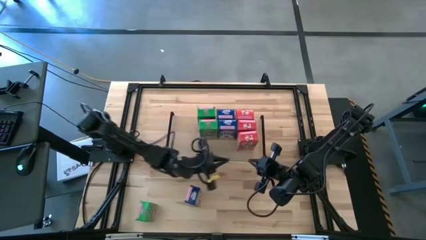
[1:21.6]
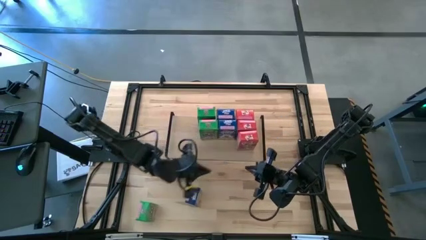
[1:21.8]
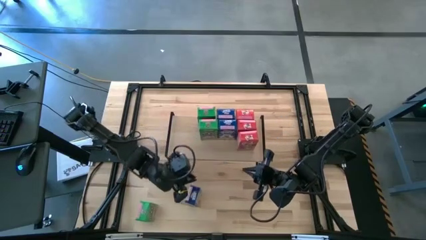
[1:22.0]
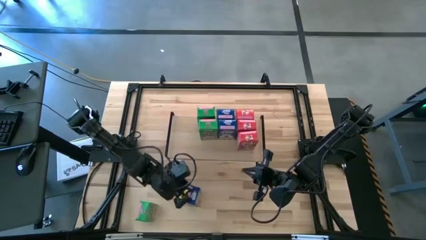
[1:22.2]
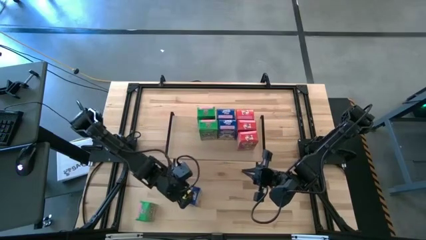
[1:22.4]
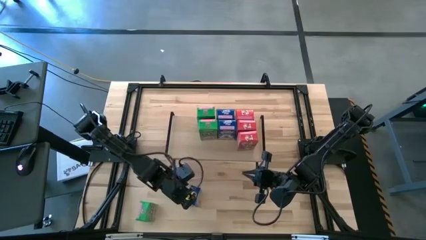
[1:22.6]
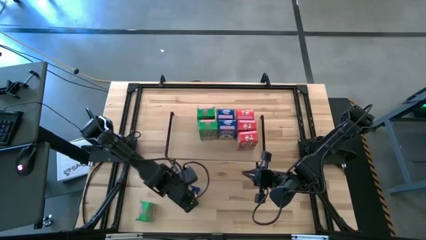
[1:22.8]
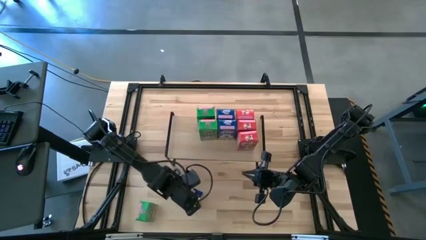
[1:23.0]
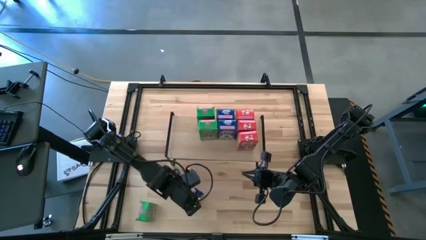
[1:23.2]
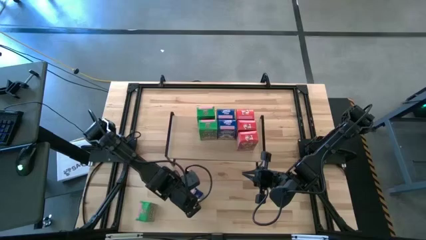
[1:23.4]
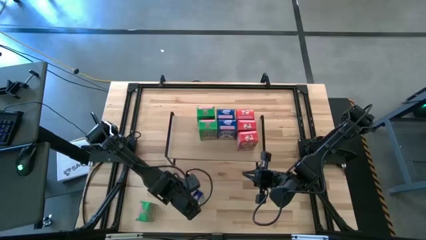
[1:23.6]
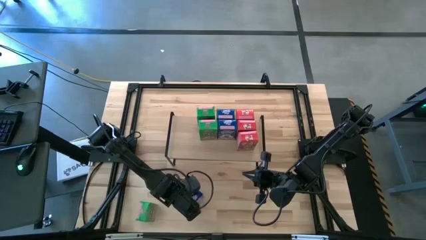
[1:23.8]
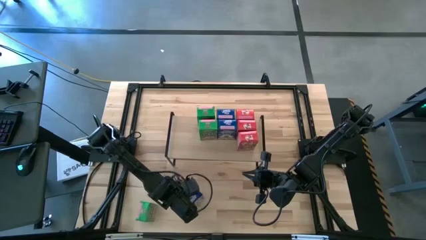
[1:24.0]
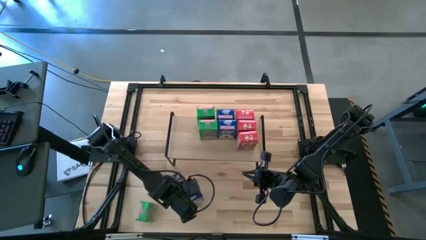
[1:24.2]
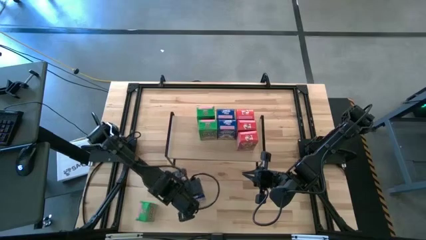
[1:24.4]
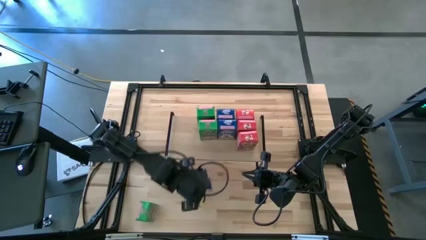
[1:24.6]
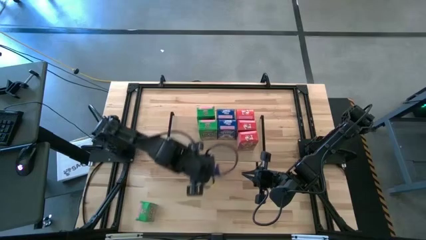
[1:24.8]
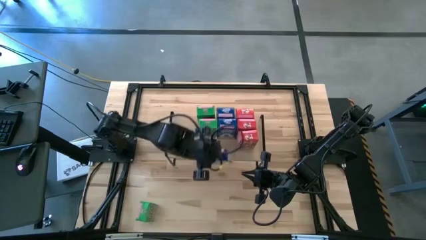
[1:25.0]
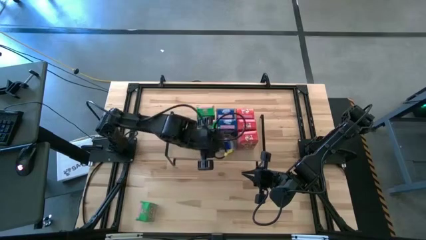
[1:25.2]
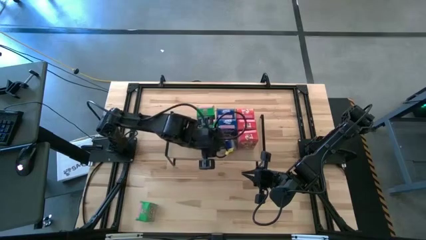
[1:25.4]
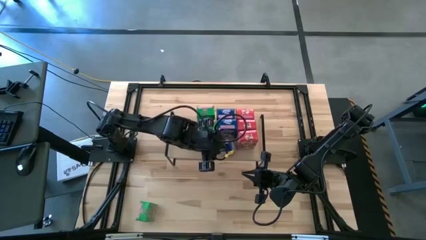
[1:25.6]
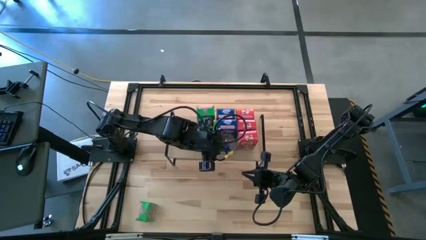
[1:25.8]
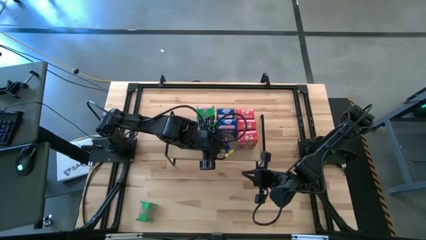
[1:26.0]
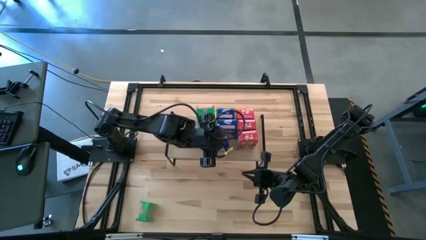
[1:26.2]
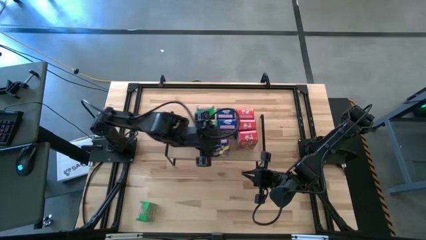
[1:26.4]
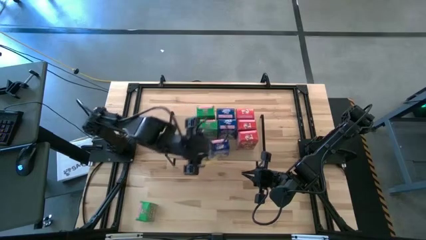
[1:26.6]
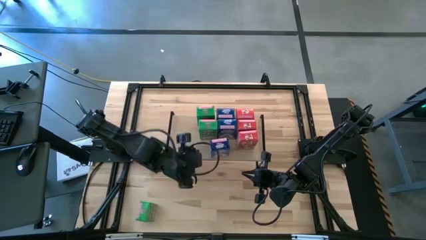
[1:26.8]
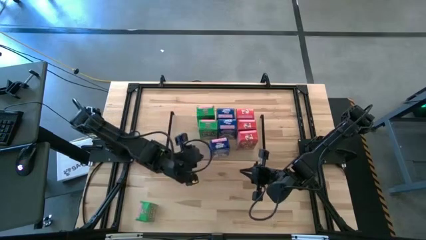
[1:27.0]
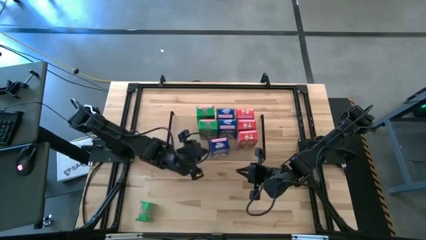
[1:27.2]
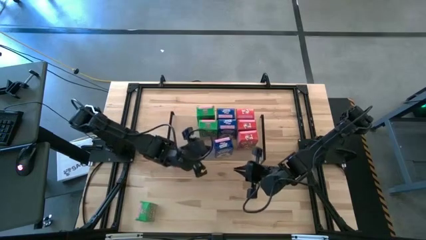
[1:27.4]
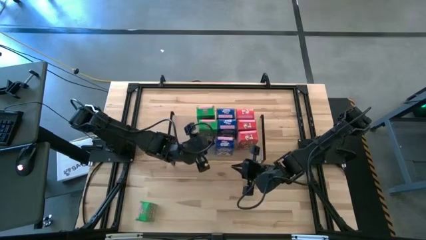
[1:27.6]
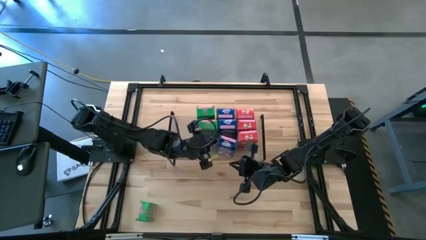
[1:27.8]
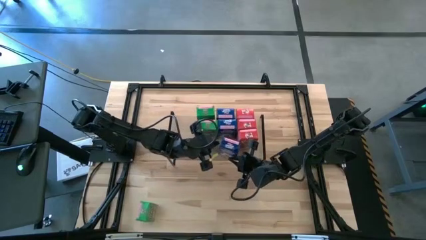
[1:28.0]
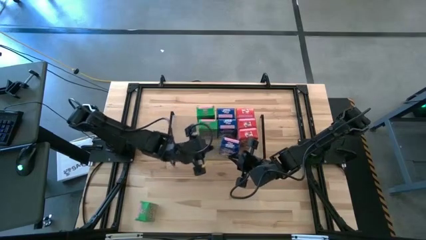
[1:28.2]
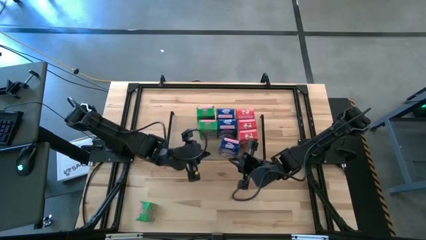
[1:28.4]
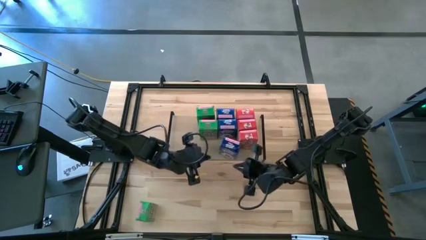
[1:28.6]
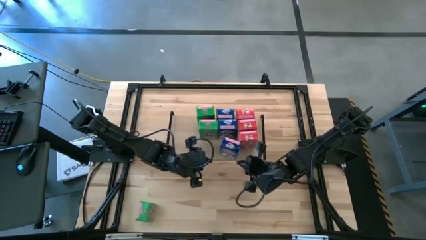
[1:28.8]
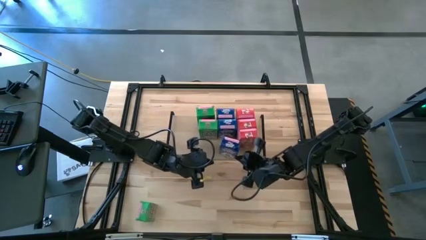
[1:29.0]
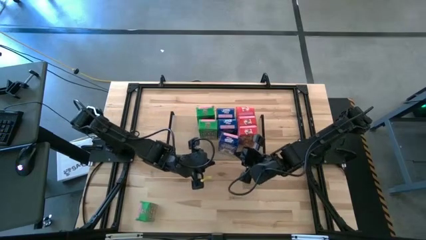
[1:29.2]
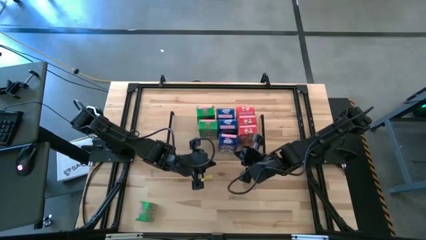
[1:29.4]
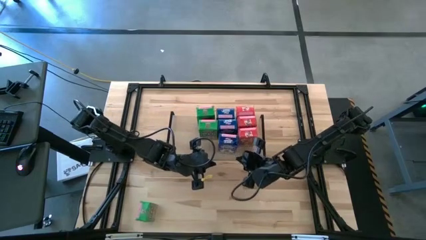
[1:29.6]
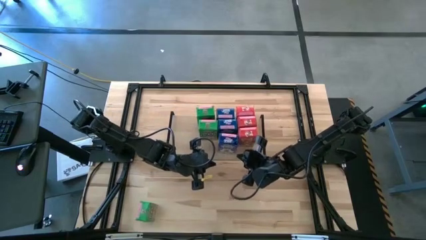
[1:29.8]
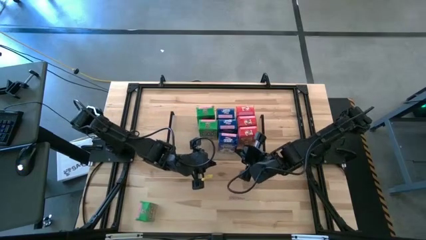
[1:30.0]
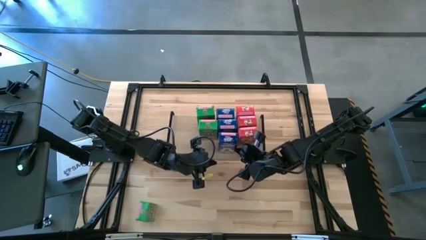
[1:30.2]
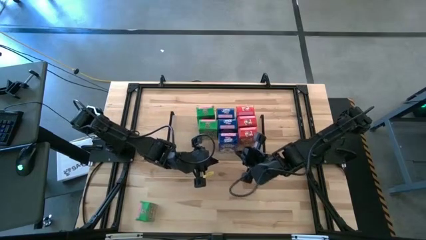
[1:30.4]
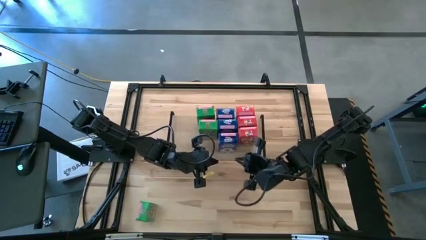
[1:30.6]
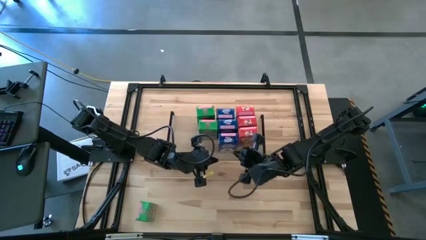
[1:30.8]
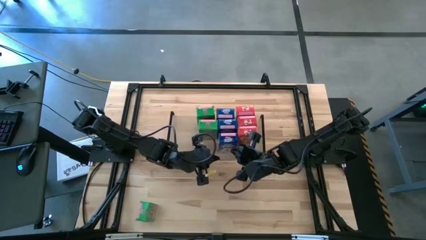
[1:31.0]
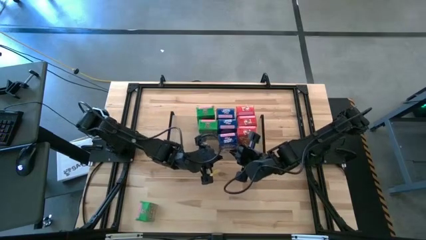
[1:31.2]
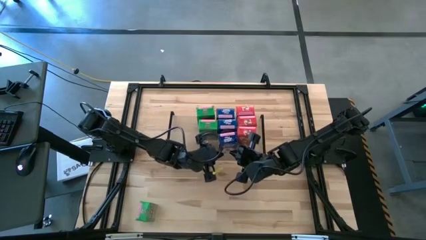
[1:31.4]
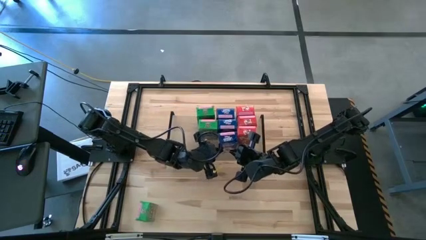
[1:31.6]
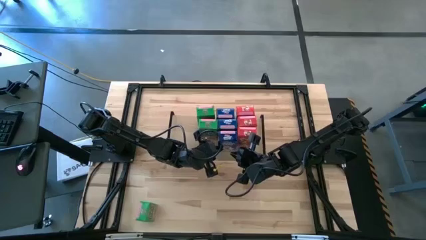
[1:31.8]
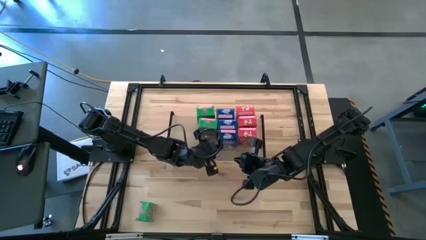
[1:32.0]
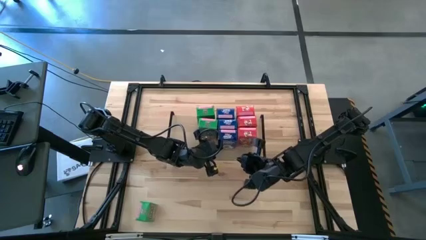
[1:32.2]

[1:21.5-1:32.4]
Task: Stack cereal on shelf
Put the blue cereal box on the shelf aligned with the other blue cereal box

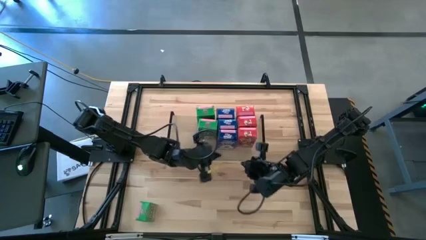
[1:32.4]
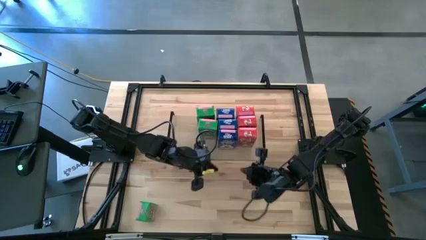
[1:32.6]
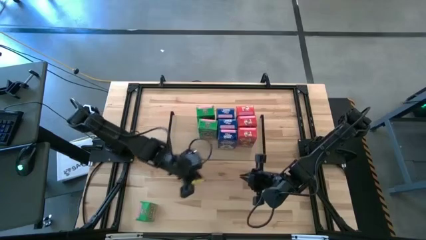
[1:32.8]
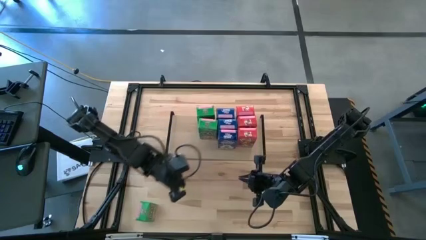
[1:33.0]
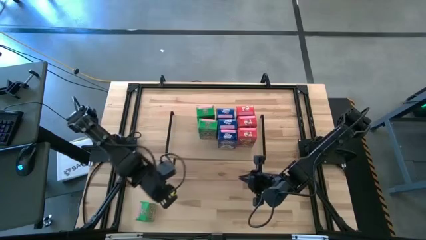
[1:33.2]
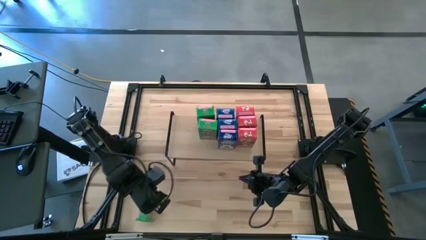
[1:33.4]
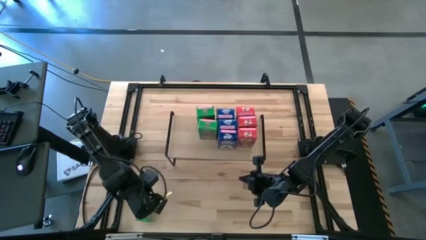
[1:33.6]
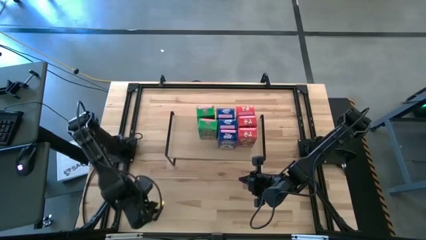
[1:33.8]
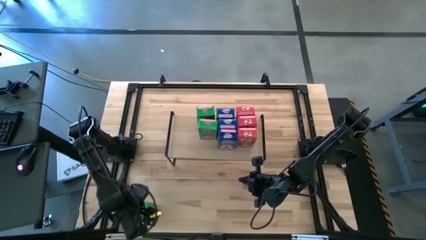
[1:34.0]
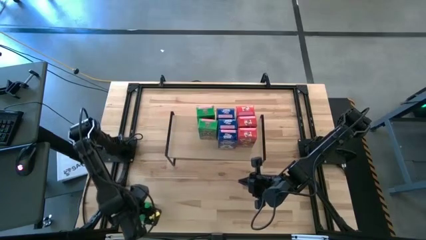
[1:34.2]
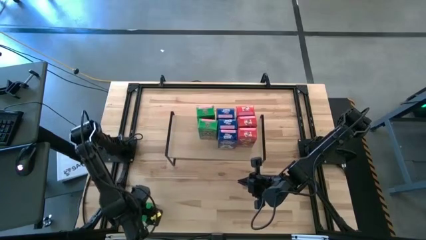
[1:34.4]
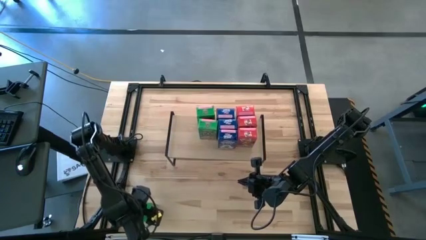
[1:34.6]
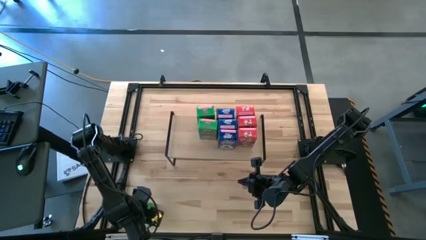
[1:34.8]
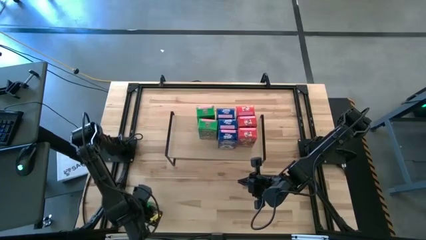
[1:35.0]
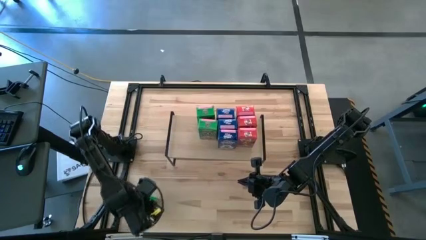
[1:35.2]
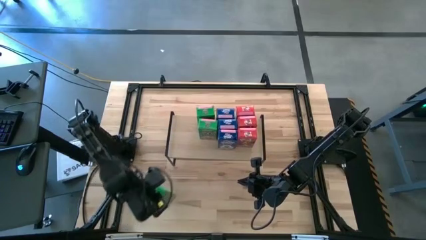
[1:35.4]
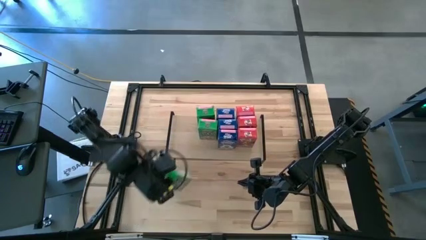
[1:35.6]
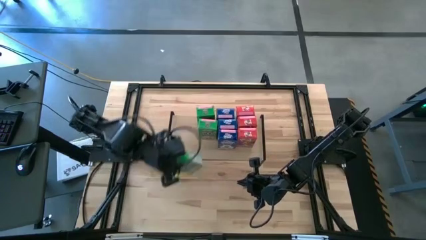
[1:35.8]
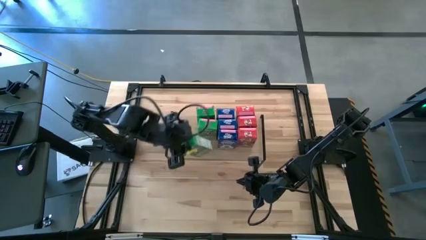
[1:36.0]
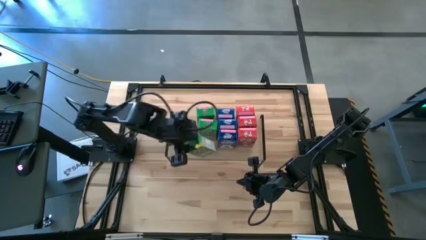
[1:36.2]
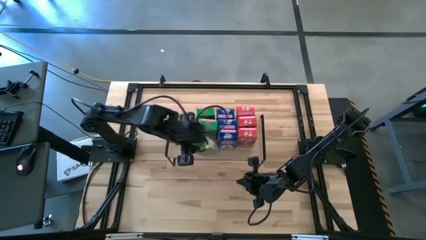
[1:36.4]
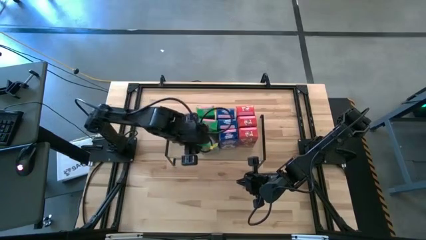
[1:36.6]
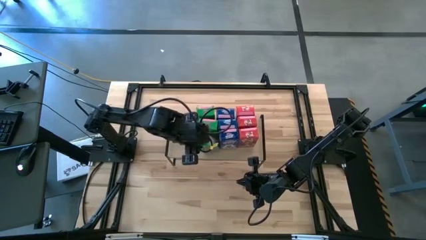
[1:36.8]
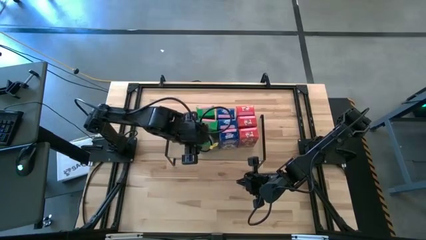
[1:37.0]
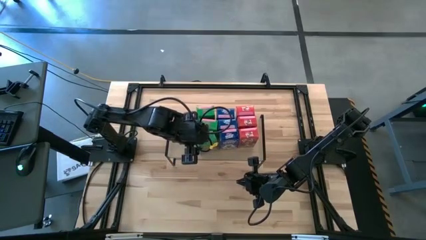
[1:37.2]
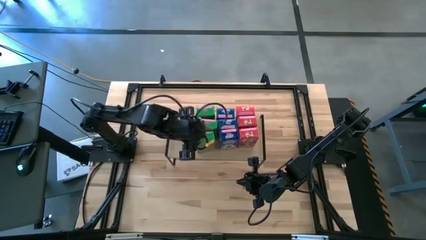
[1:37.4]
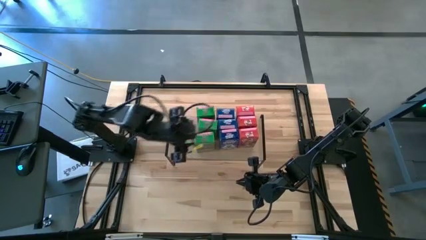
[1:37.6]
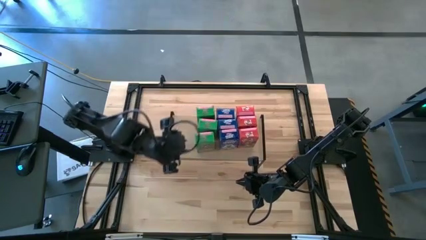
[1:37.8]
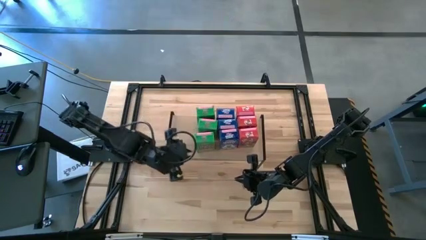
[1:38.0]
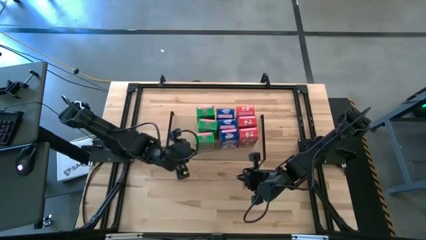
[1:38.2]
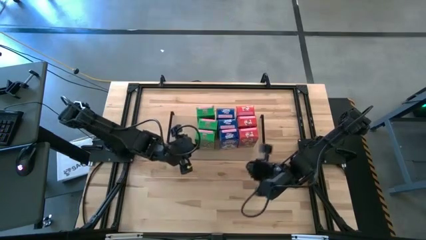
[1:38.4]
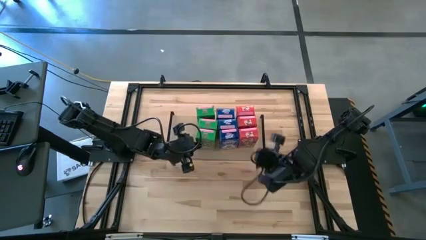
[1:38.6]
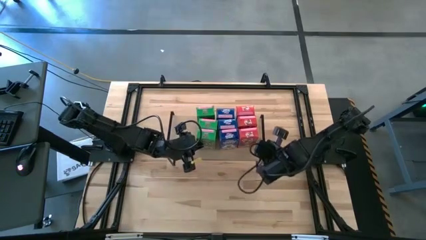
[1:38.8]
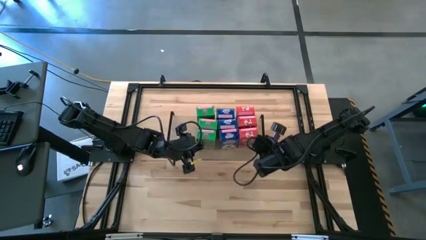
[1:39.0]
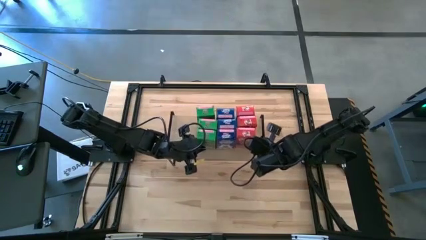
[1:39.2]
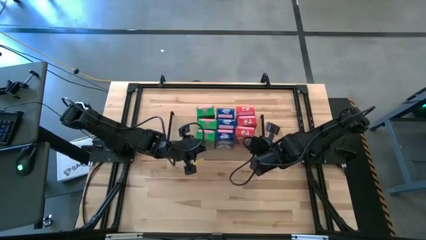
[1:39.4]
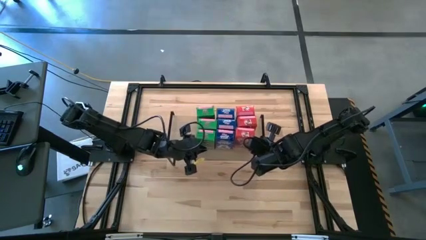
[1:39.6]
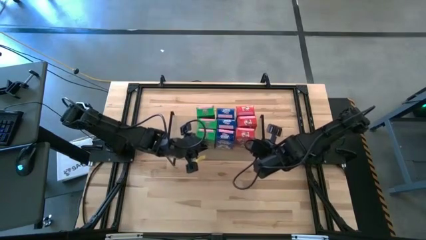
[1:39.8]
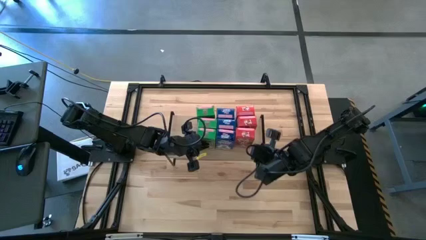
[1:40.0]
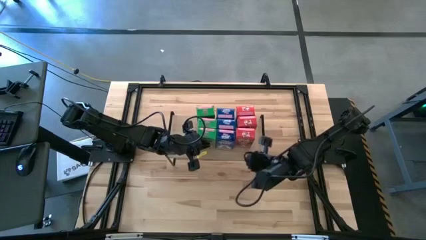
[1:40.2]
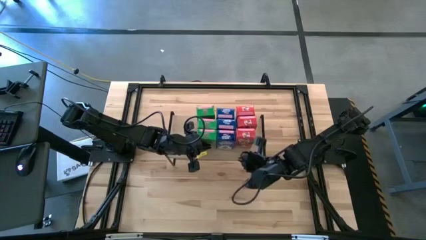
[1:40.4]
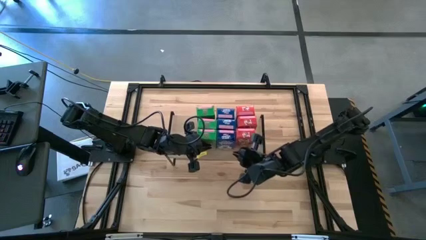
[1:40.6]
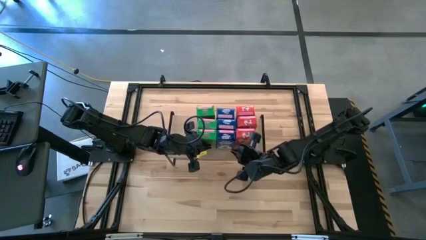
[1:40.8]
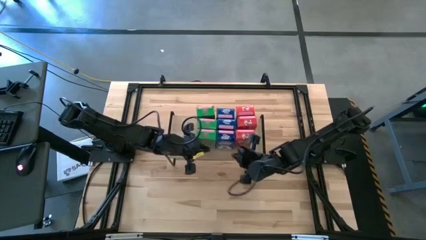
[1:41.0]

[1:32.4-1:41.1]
Put the green cereal box on the shelf aligned with the other green cereal box
